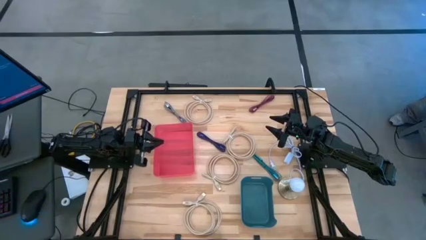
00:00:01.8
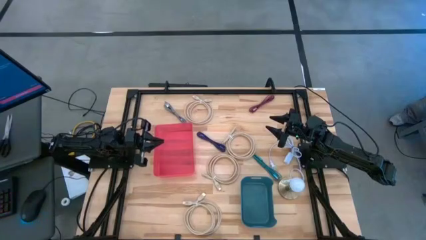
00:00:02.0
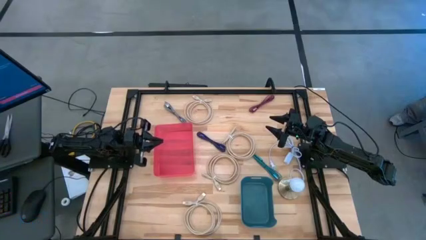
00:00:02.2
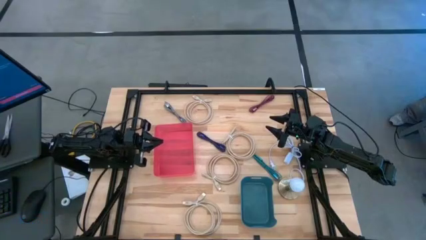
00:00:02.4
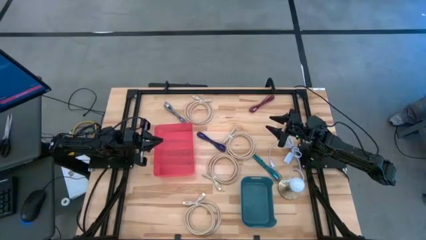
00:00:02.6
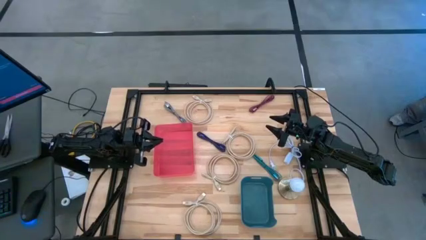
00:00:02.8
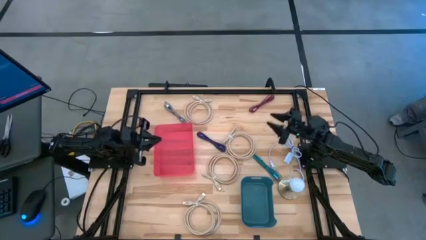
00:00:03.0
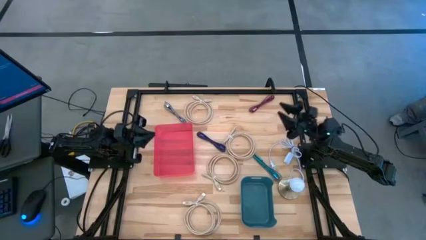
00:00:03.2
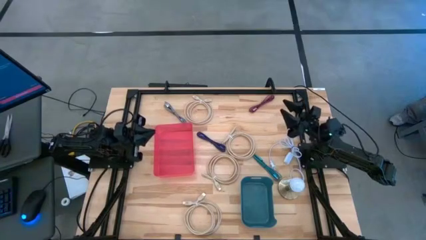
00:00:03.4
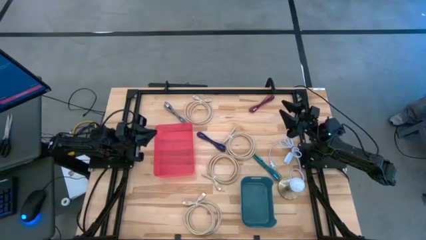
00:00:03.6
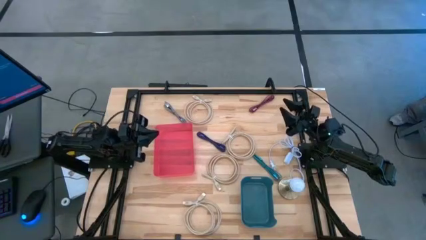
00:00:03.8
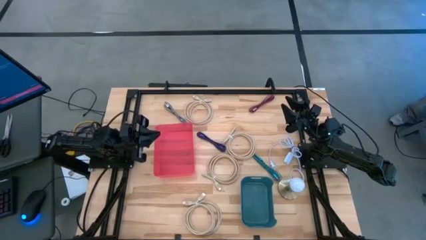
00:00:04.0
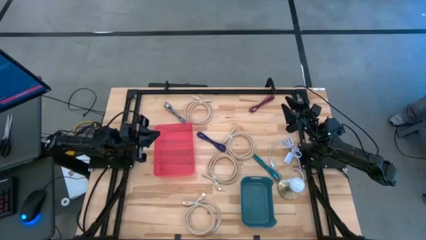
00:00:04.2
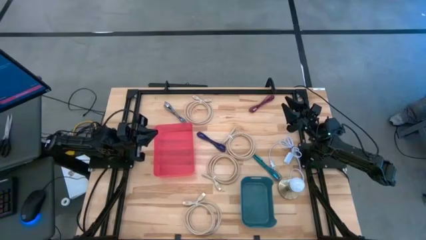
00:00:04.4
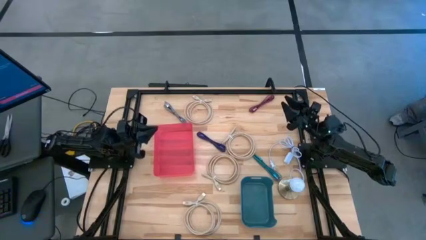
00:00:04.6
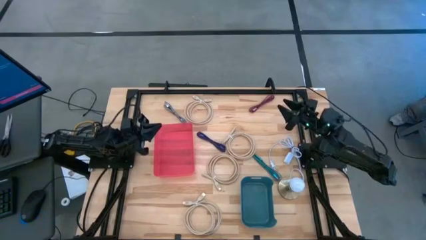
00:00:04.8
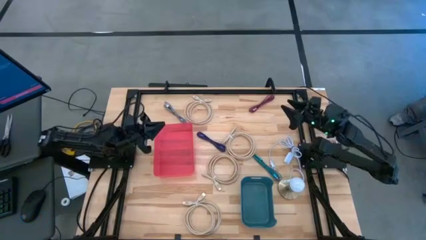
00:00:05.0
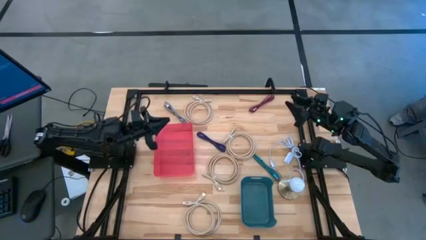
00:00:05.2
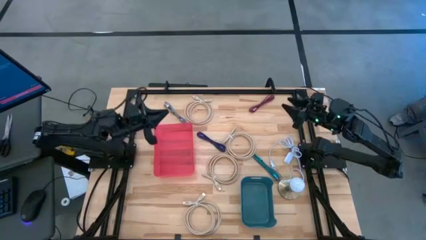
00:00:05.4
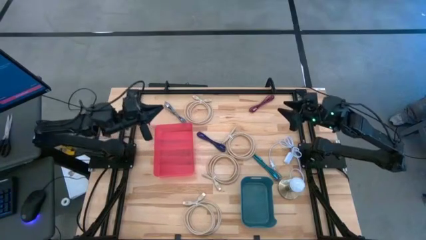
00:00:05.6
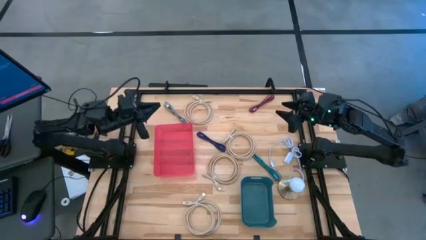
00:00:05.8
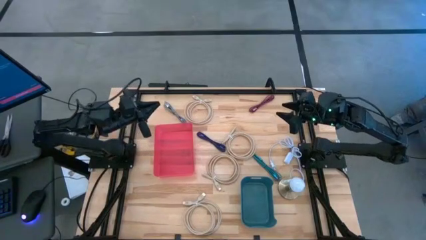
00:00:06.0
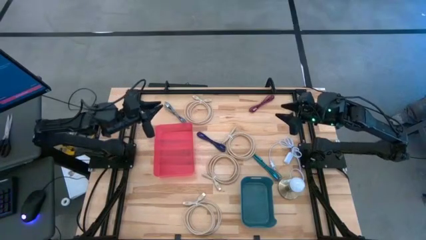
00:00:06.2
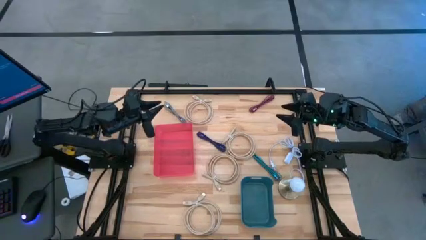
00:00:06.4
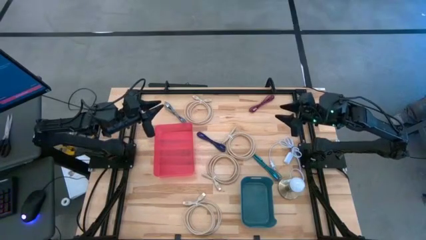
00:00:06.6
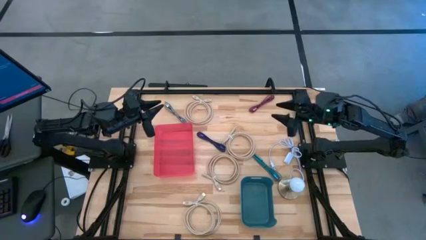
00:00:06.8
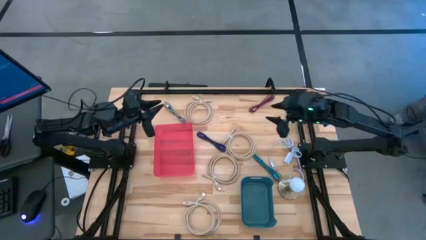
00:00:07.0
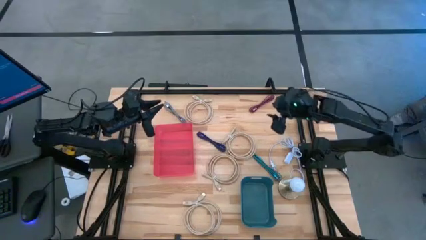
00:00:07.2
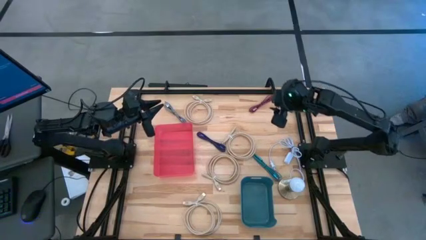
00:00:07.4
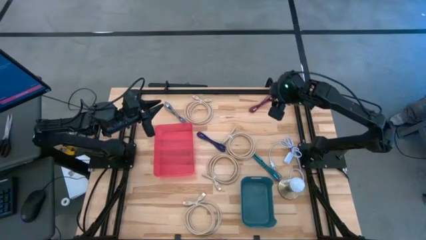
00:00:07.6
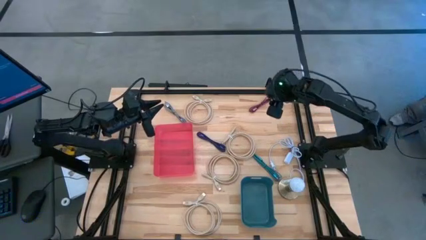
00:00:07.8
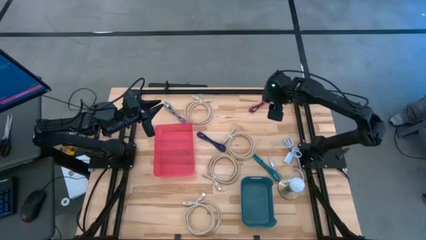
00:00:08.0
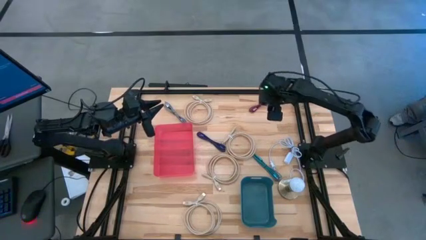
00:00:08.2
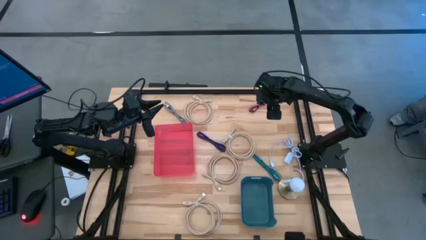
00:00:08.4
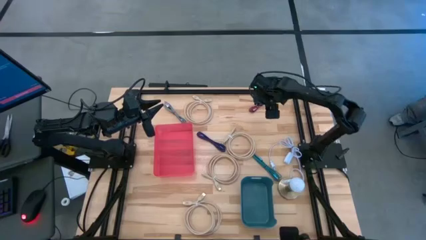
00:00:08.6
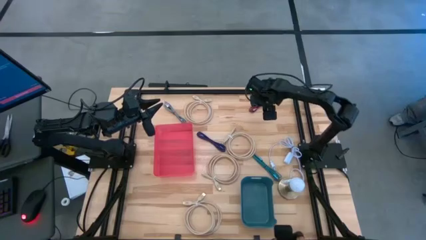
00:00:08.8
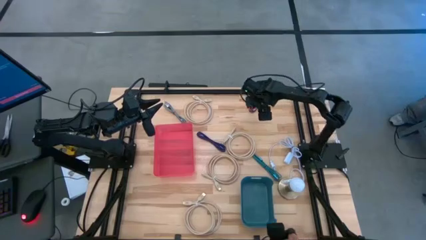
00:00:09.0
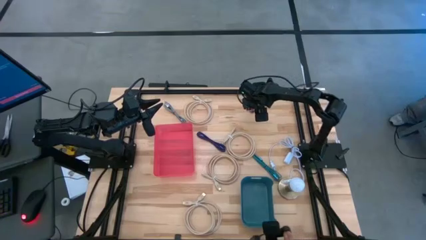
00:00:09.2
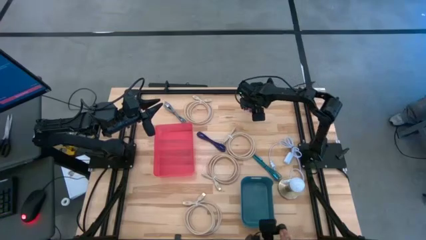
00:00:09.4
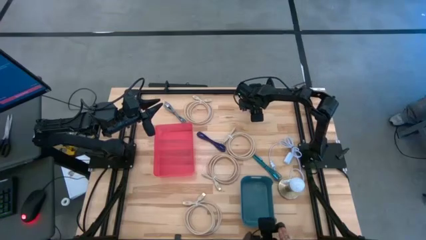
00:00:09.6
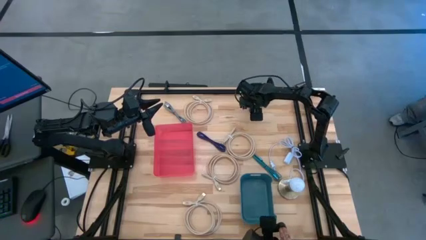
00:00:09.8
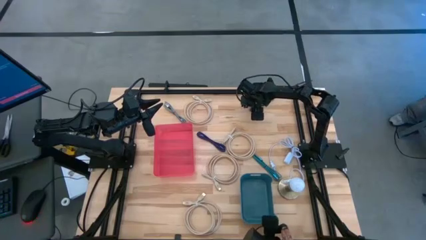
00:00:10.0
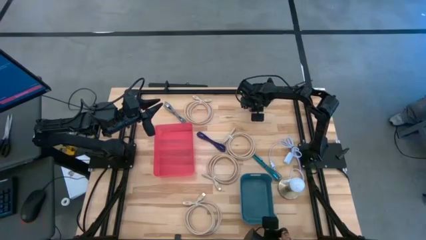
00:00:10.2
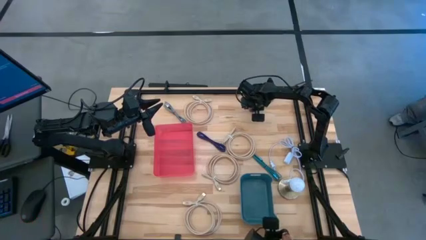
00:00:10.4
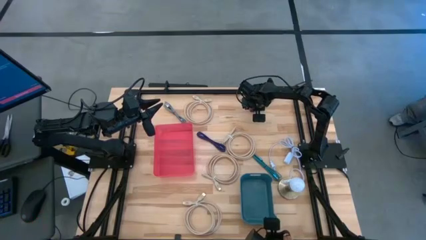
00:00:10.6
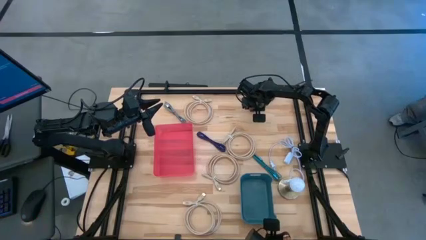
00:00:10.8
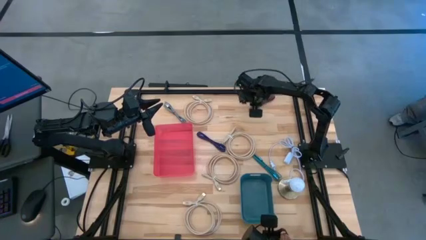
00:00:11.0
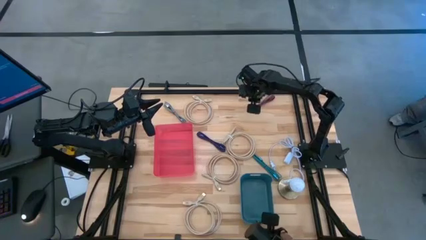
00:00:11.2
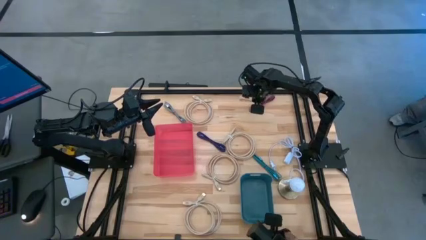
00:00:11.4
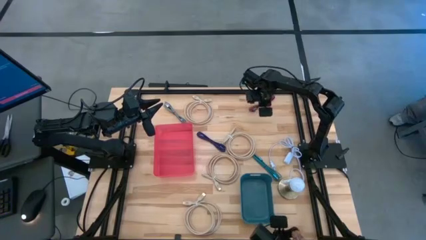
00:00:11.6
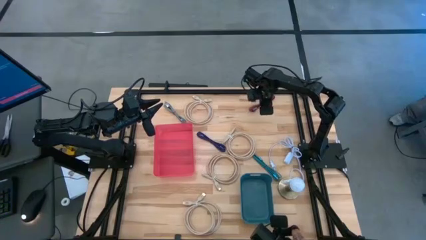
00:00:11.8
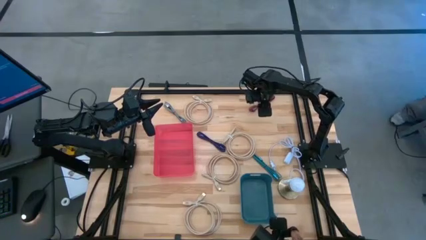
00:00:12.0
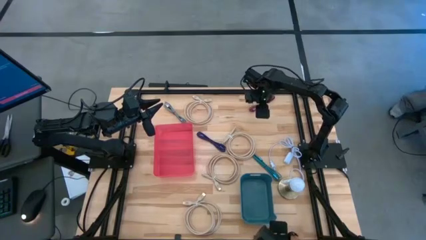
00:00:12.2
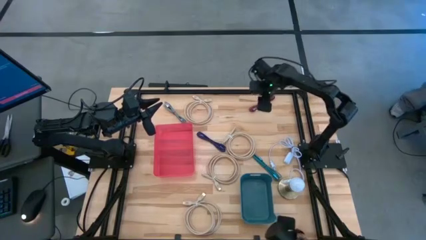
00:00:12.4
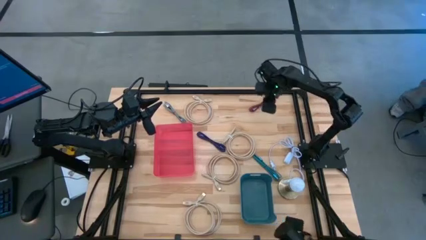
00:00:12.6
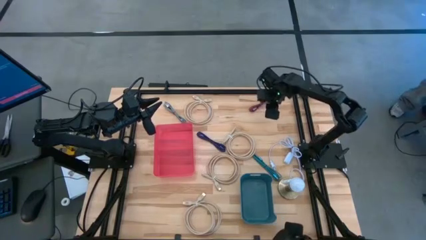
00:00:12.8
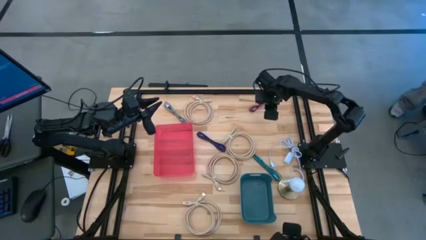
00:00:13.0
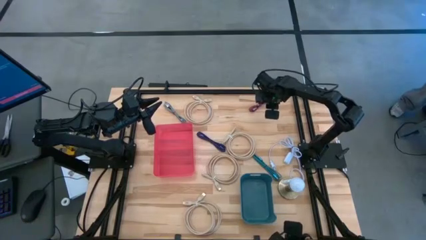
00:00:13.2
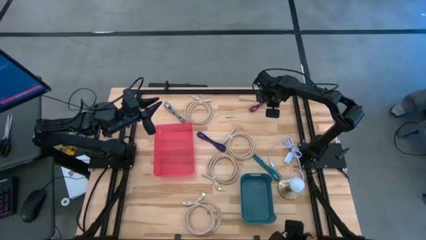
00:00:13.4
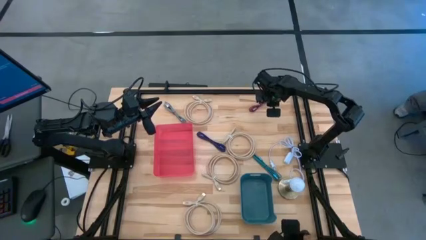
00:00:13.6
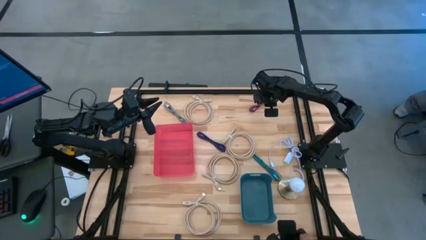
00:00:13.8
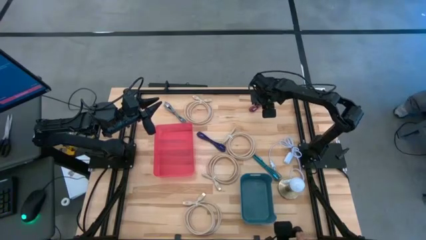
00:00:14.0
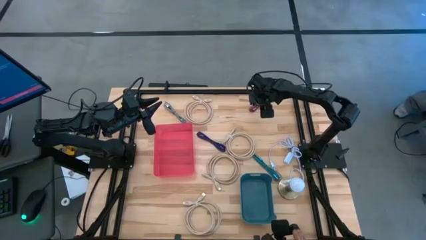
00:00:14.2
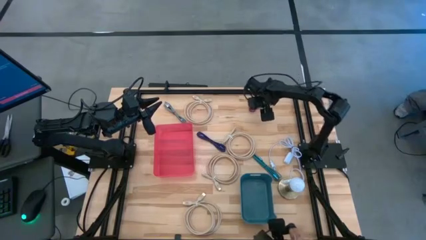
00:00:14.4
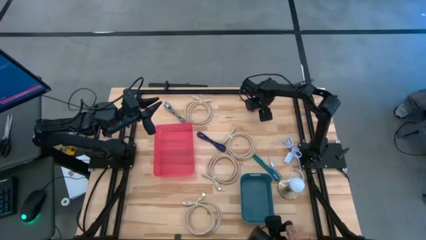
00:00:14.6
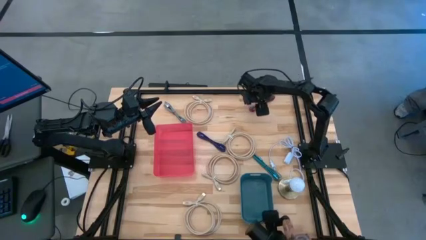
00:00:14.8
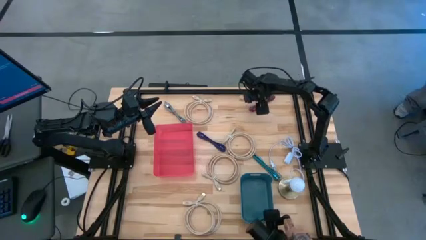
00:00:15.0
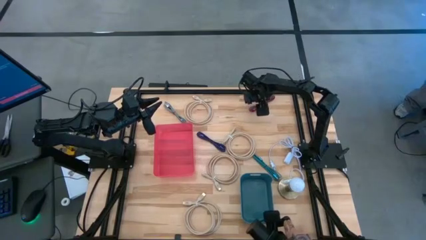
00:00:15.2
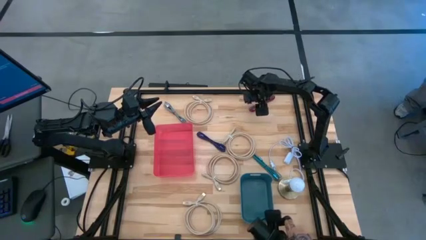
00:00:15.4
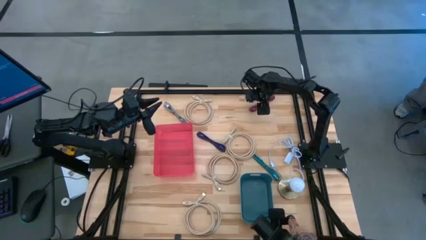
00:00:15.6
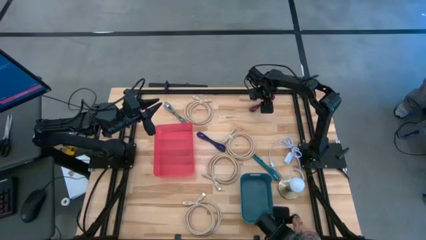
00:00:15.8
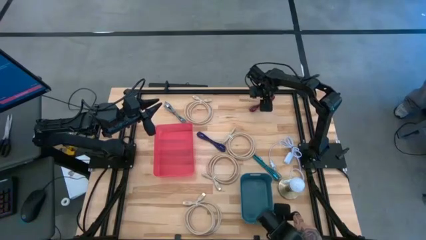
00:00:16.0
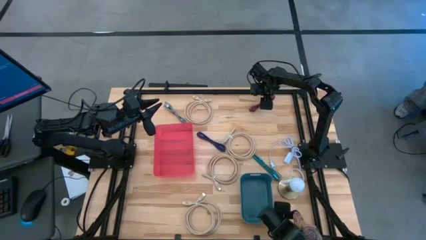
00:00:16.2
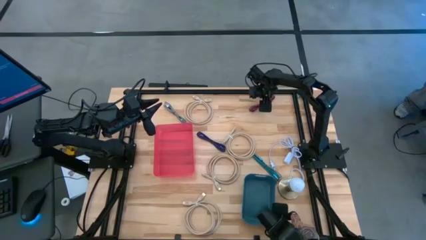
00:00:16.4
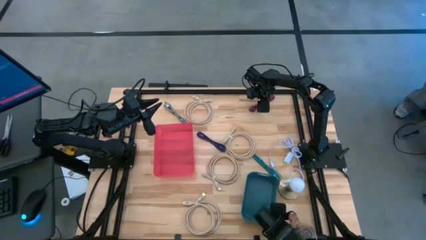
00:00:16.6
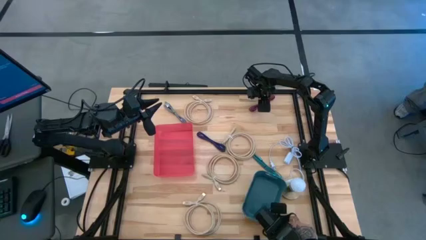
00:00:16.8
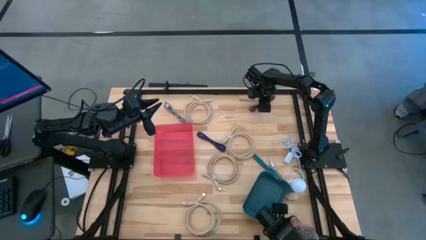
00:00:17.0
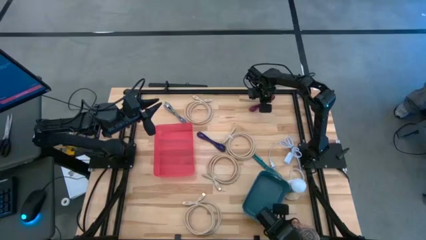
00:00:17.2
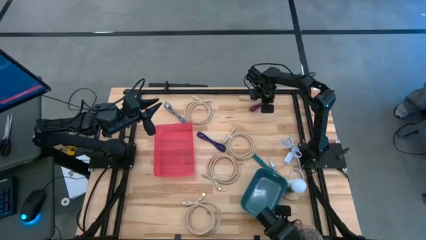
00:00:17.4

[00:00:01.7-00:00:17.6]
Task: Pick & Place USB Port
Put the red charger cable into the red bin
